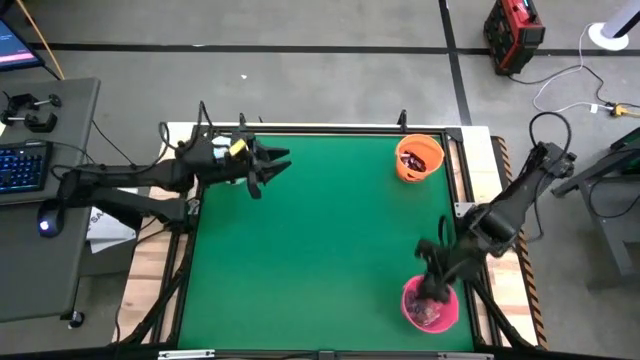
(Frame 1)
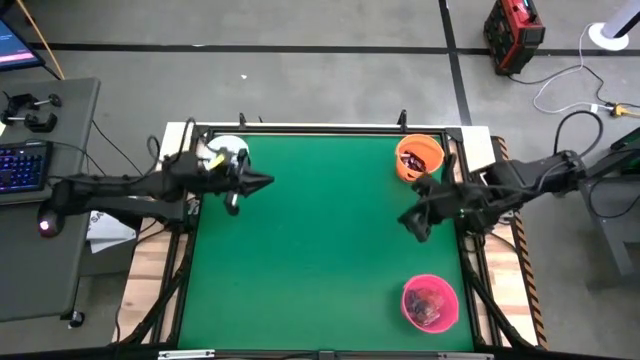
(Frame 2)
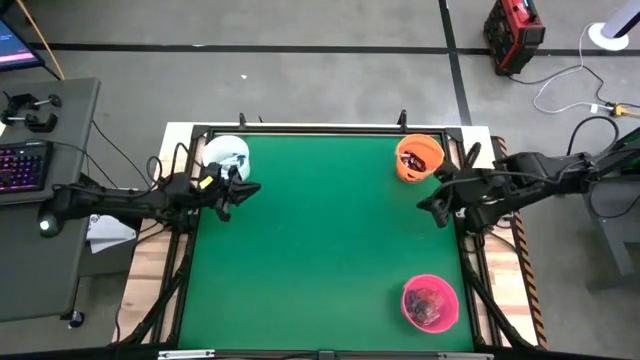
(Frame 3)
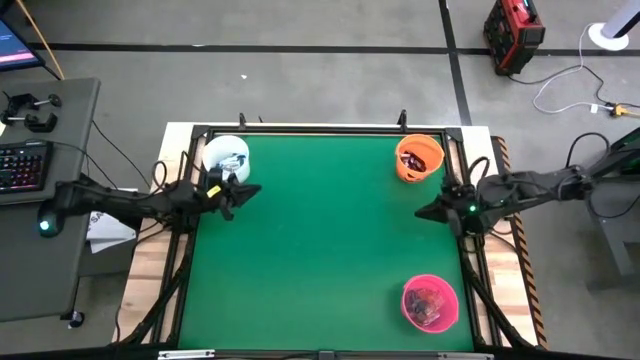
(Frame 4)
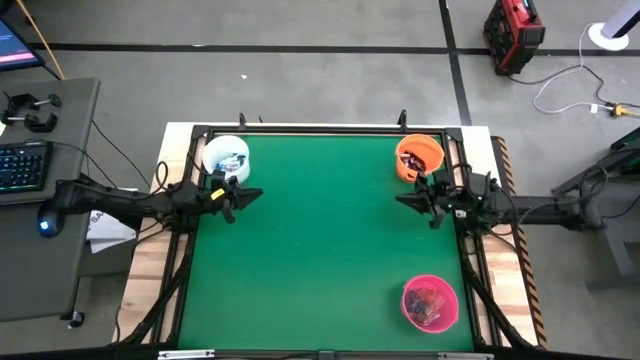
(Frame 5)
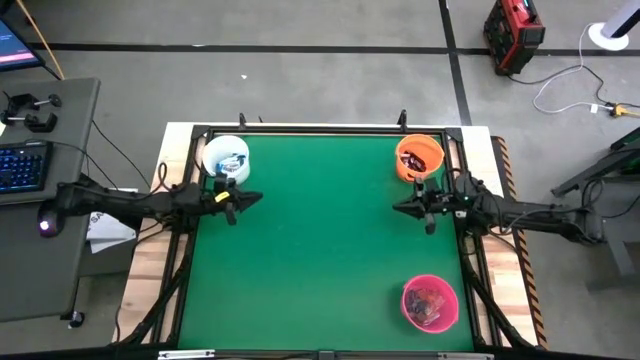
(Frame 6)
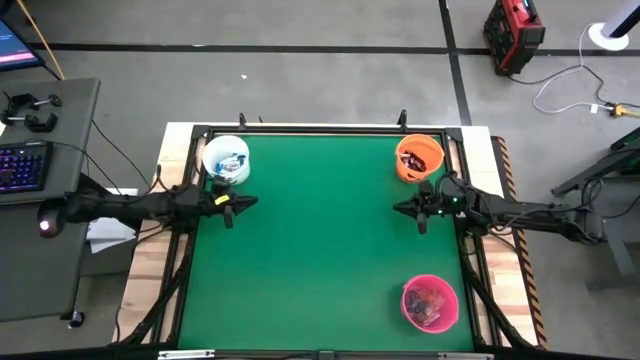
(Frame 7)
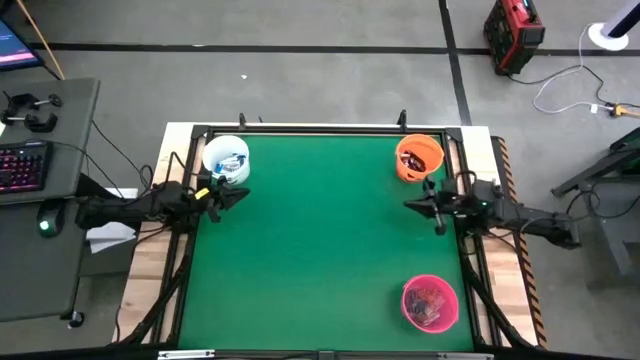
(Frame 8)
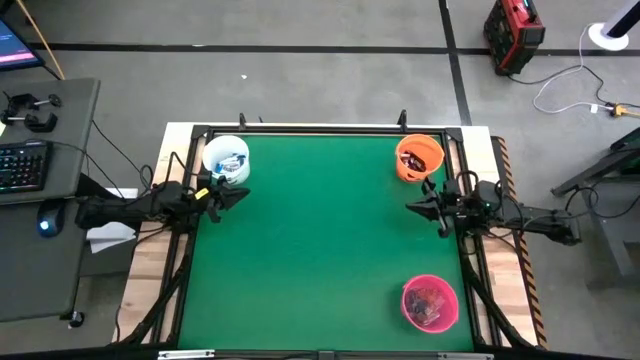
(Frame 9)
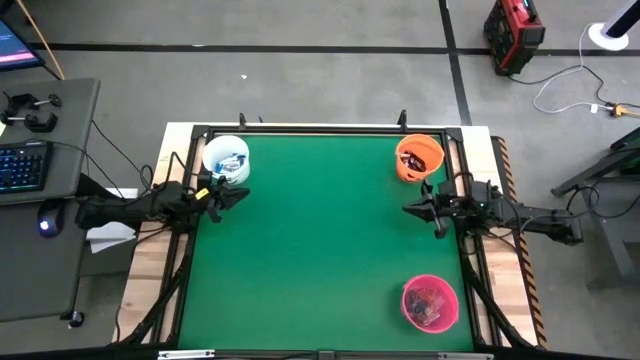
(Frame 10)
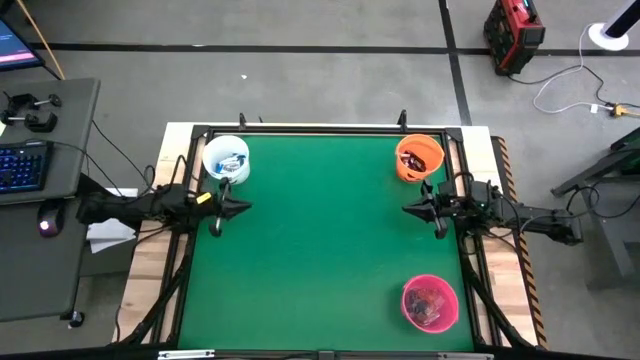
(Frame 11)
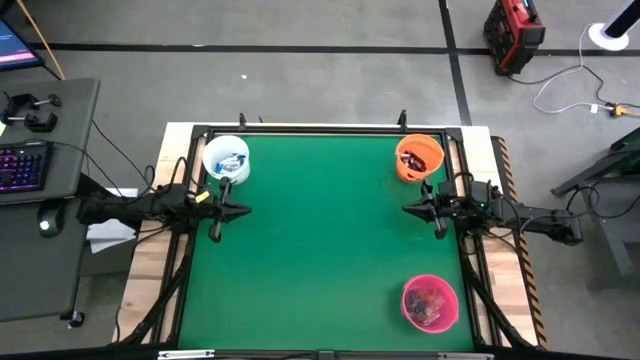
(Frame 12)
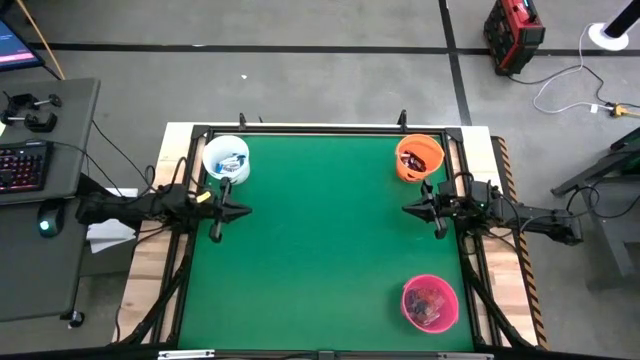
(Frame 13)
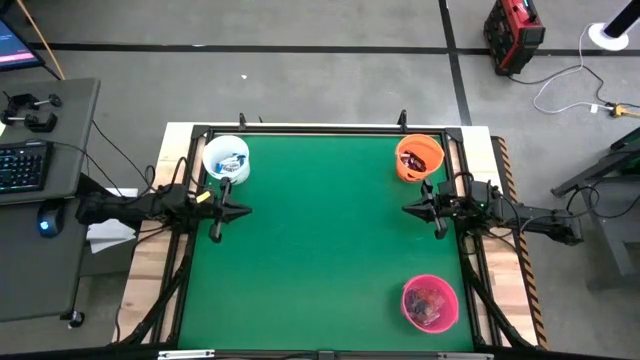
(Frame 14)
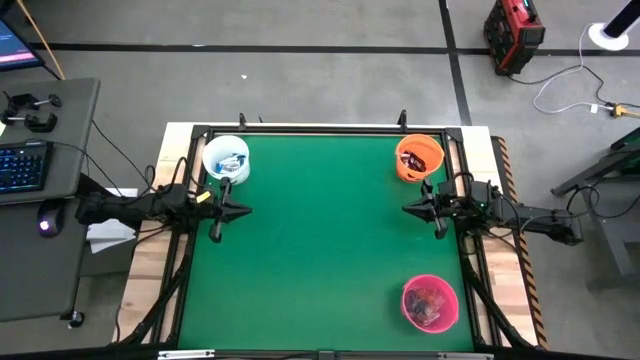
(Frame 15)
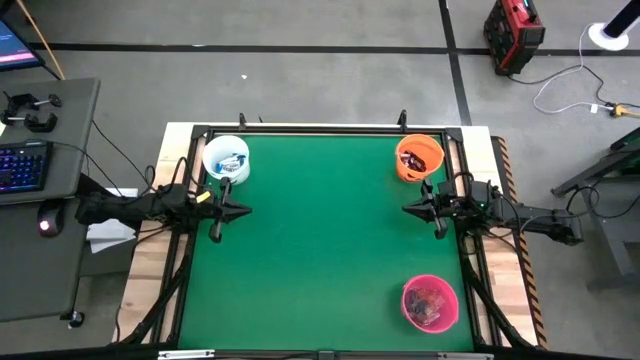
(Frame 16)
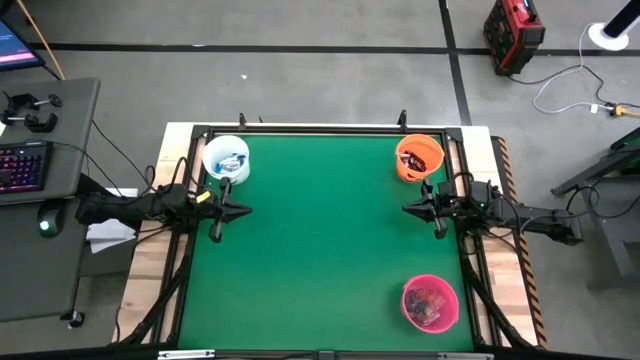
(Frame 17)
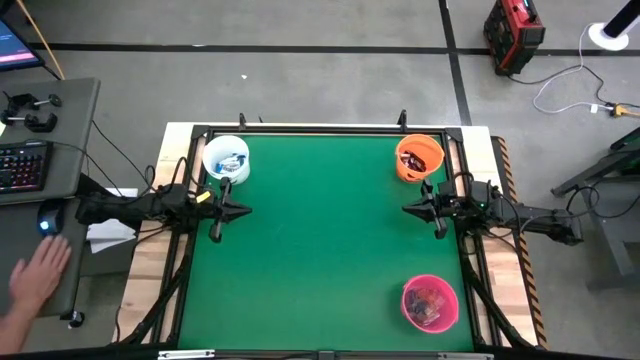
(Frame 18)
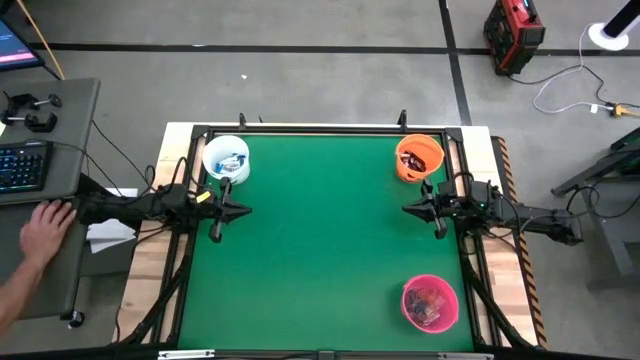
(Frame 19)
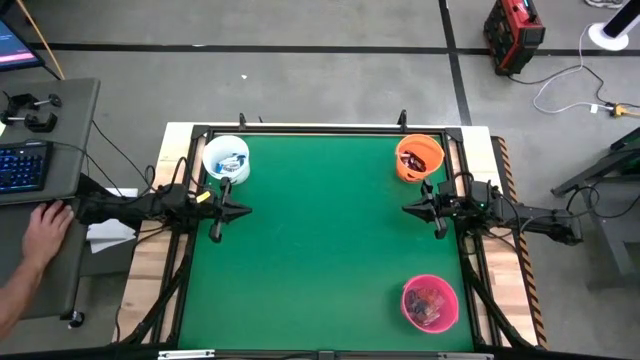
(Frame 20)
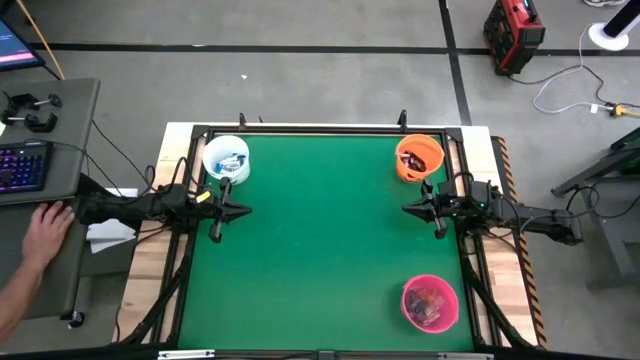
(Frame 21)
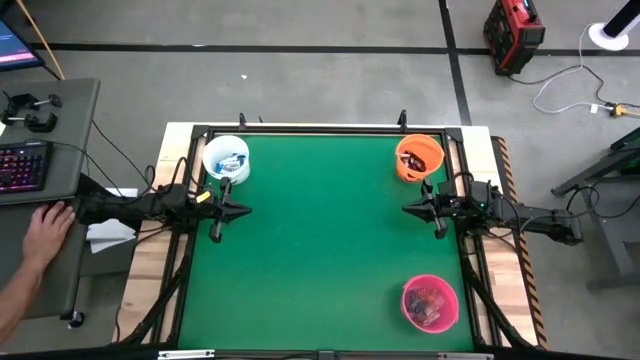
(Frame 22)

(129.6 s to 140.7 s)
Task: Sort candy by brand, put in halloween buckets
Return to Home Position

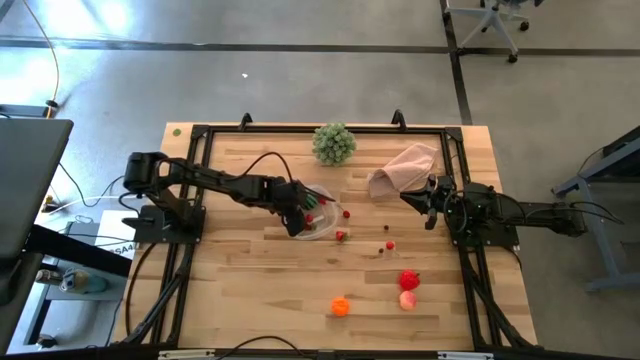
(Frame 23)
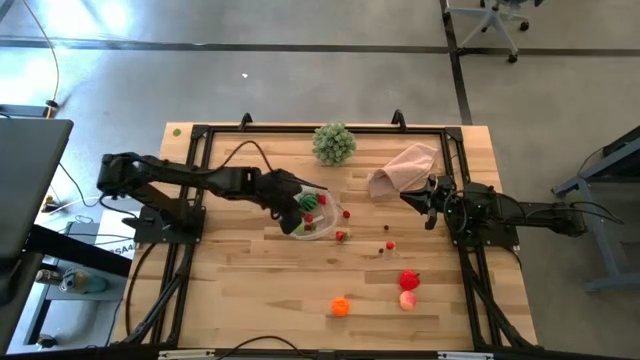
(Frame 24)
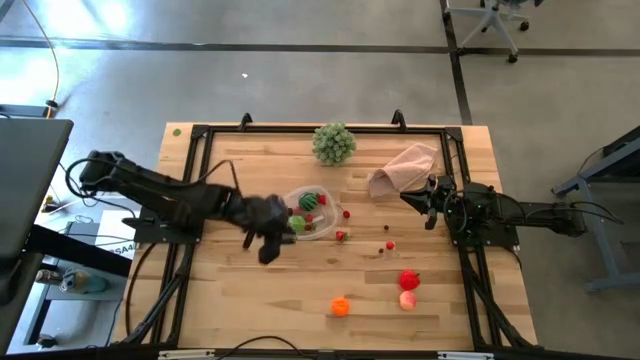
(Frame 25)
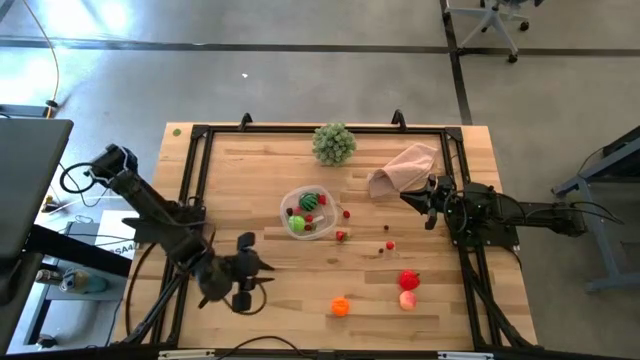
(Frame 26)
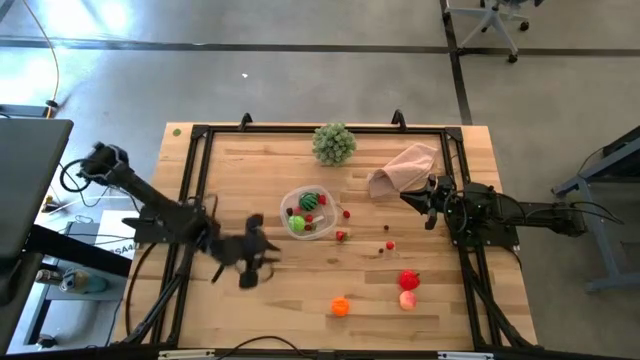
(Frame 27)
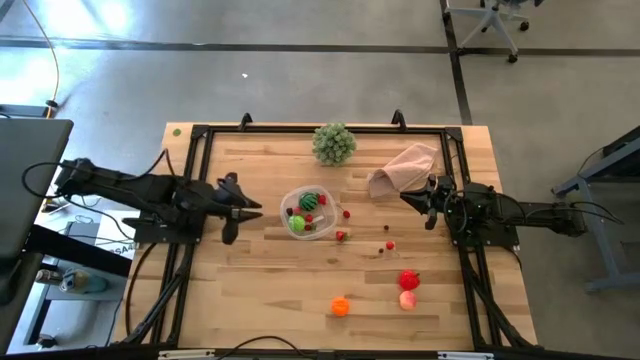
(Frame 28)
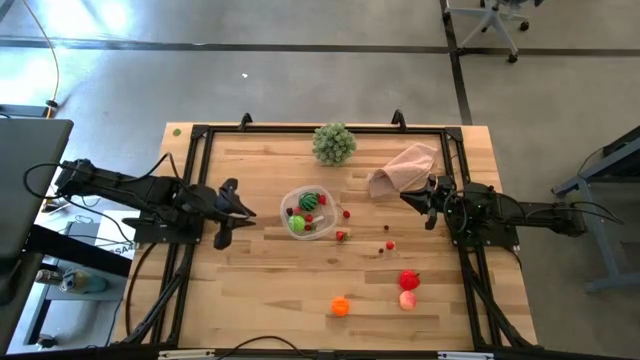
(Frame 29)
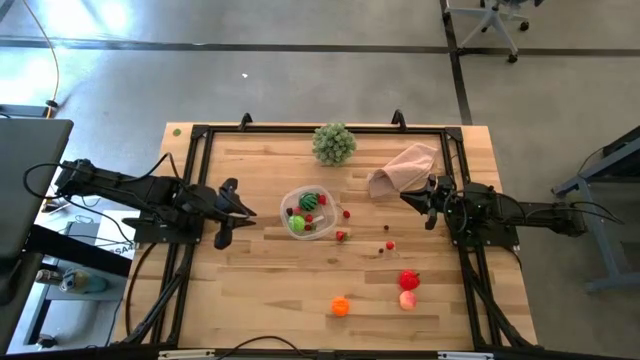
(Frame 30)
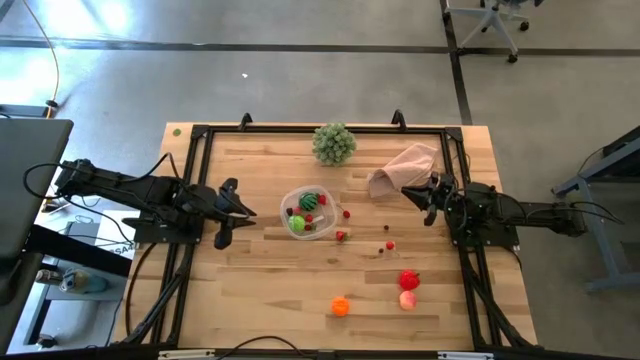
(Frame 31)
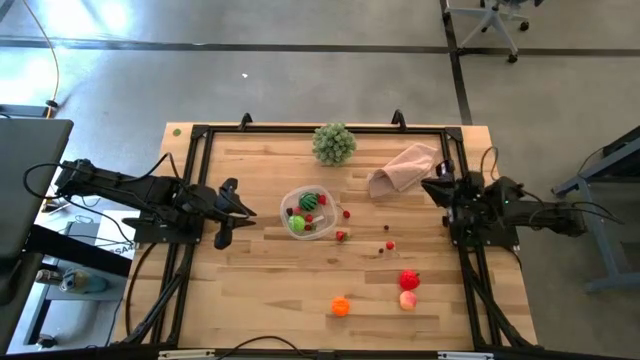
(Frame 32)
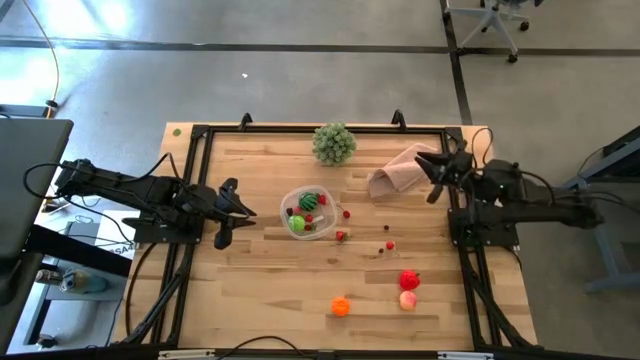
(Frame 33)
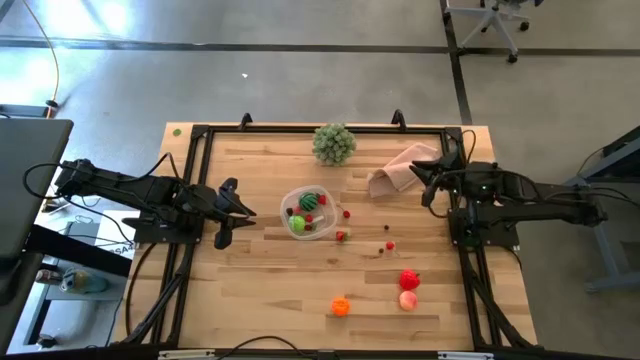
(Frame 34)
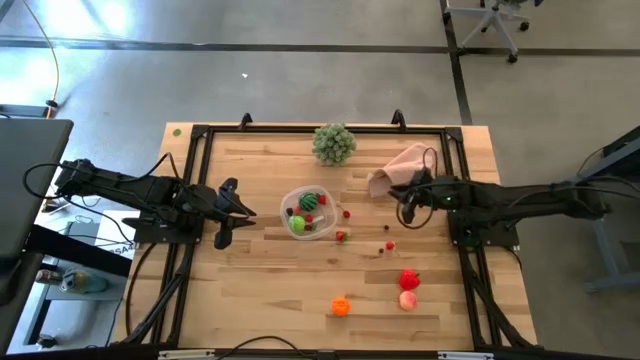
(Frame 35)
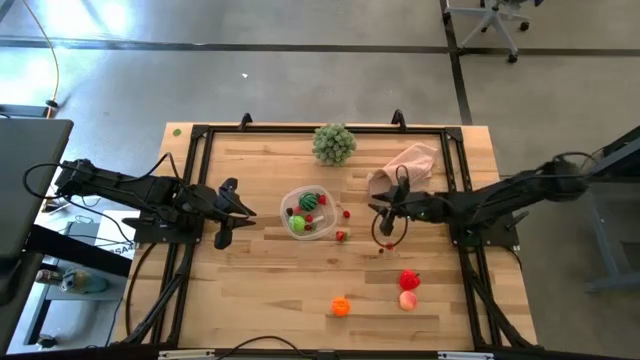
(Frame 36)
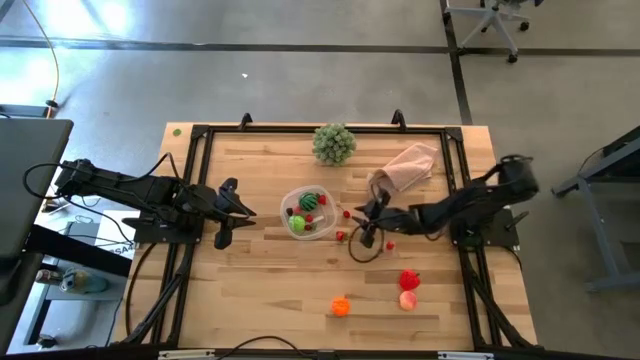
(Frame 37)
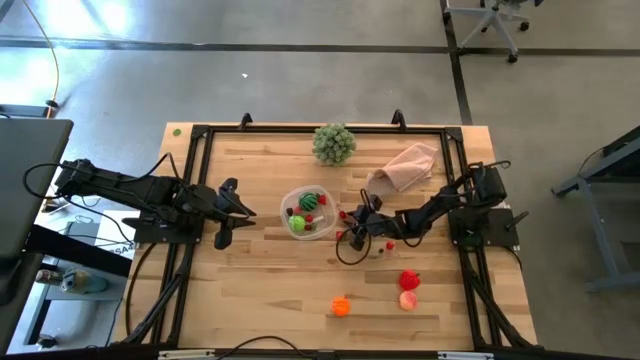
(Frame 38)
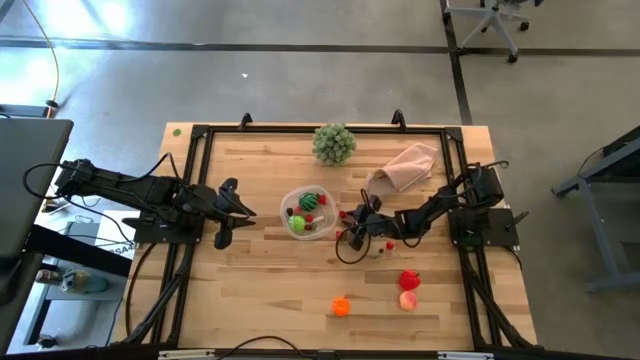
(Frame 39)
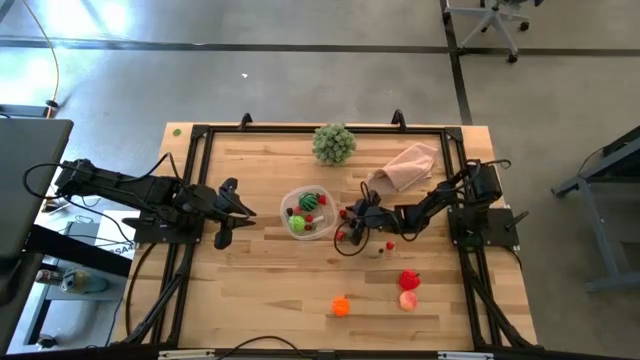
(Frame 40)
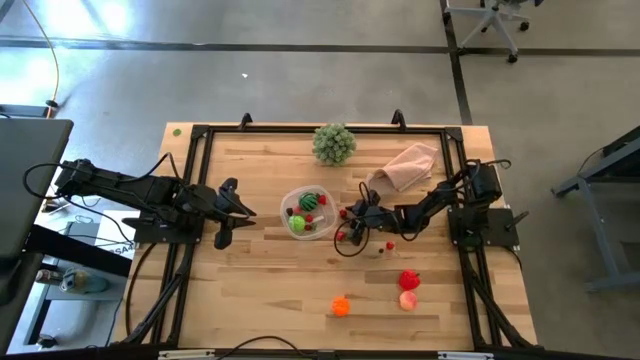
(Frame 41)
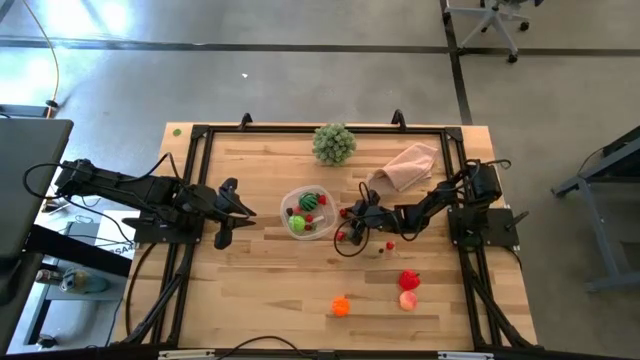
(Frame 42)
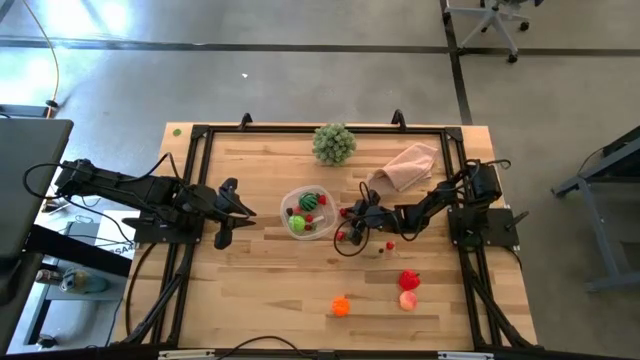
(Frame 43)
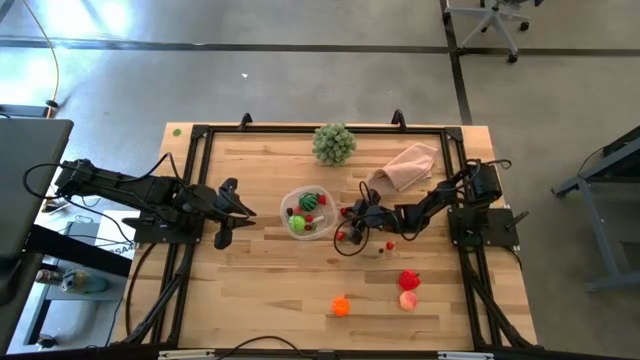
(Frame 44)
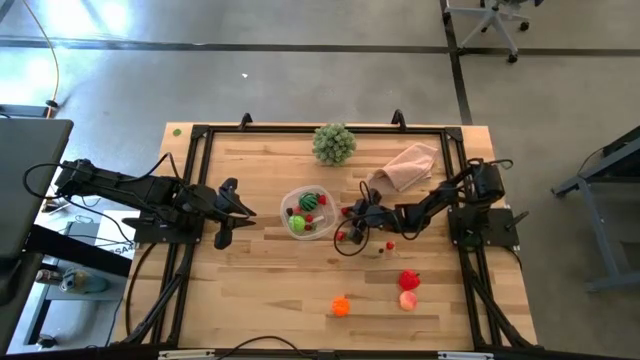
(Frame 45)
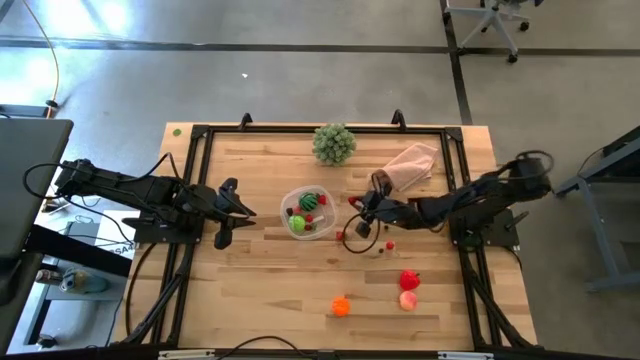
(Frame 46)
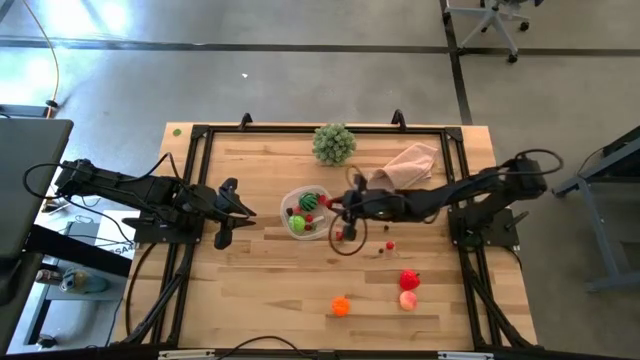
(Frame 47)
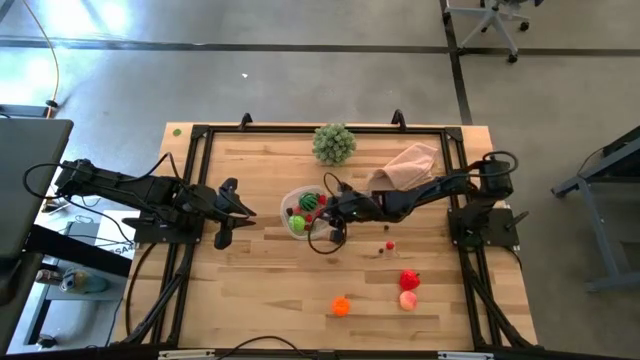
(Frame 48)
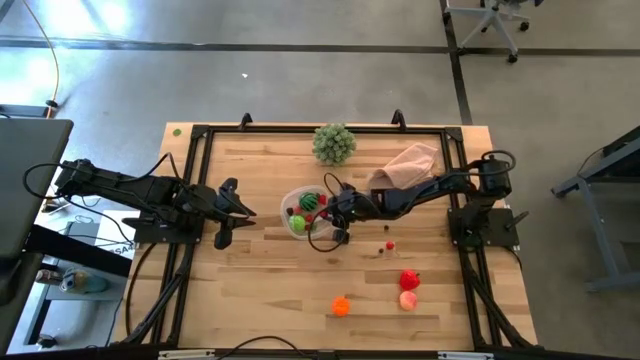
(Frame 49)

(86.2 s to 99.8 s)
Task: Pick and placing Produce into tupperware
Put the red cherry into the transparent bin
